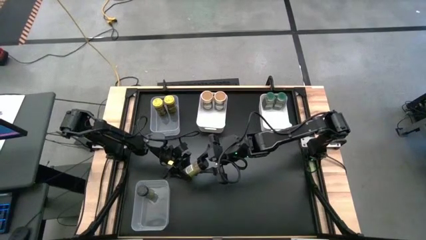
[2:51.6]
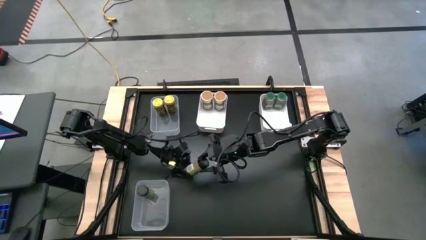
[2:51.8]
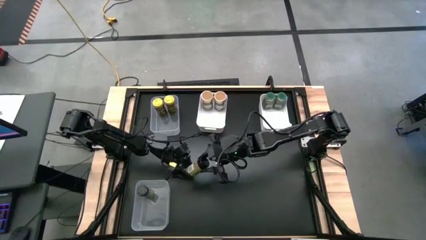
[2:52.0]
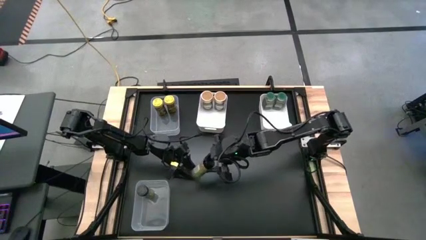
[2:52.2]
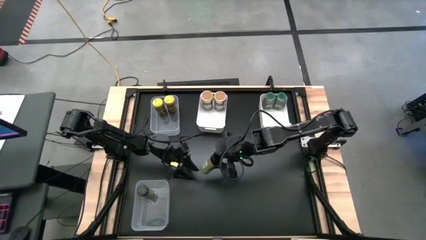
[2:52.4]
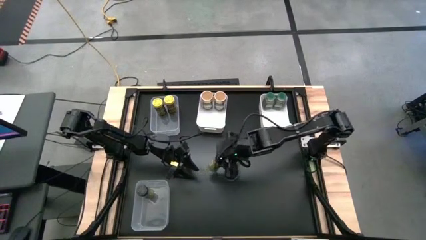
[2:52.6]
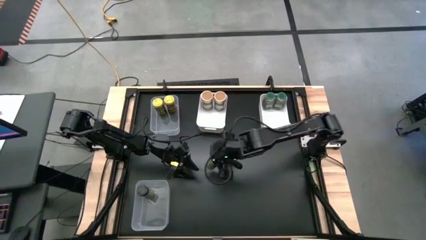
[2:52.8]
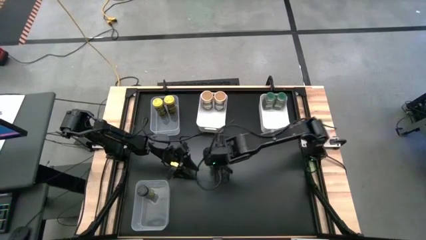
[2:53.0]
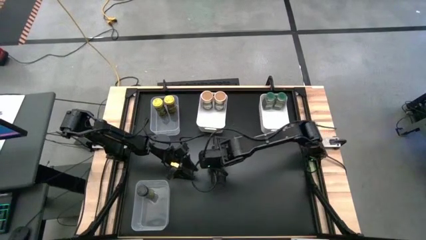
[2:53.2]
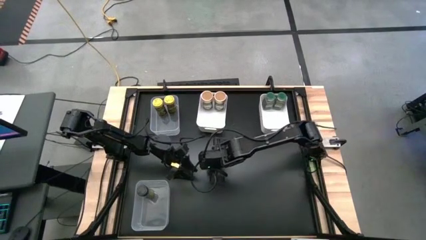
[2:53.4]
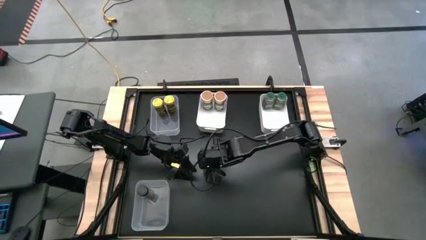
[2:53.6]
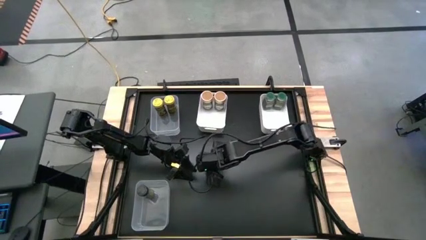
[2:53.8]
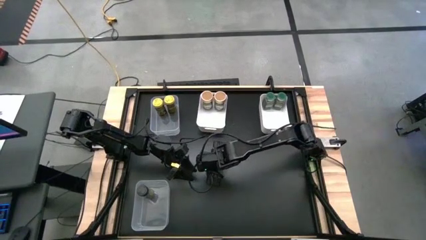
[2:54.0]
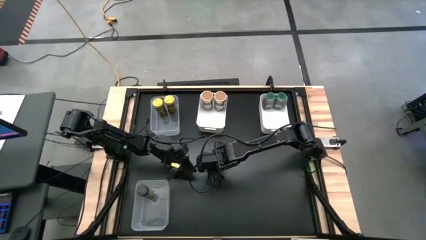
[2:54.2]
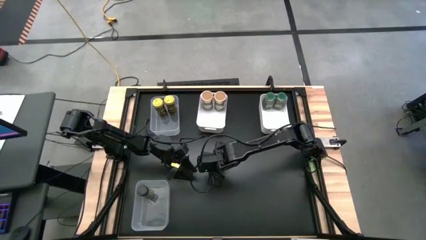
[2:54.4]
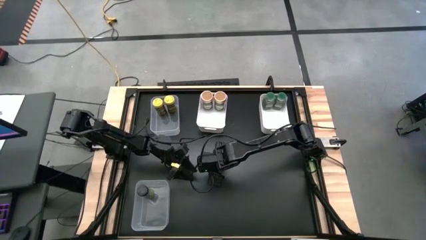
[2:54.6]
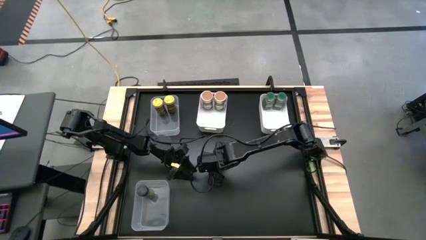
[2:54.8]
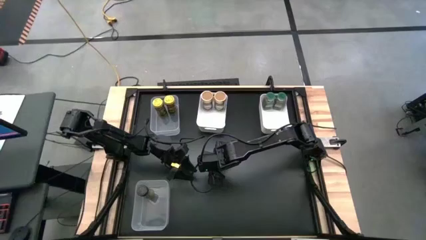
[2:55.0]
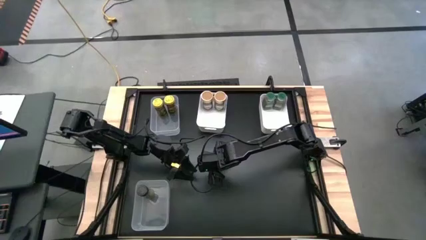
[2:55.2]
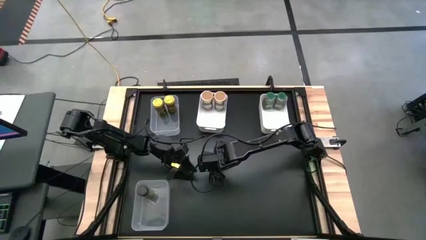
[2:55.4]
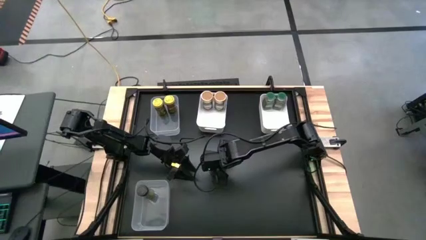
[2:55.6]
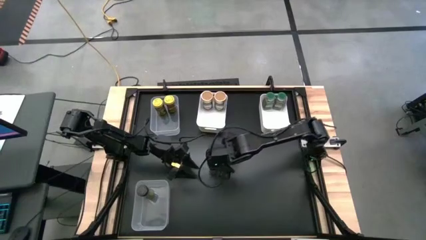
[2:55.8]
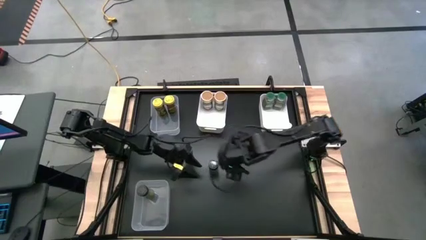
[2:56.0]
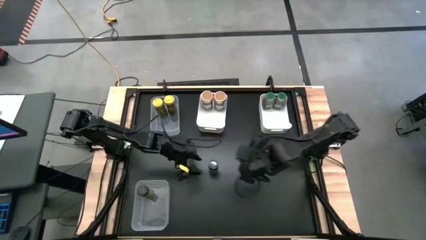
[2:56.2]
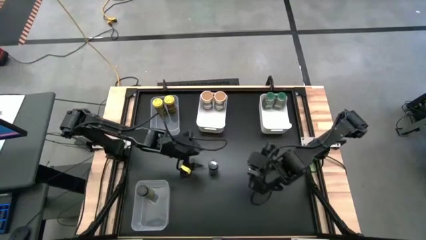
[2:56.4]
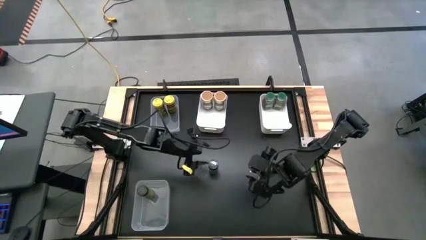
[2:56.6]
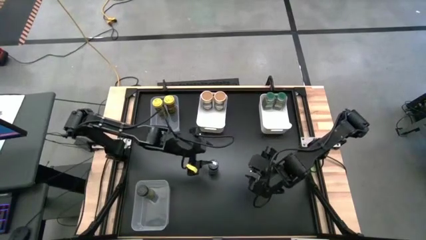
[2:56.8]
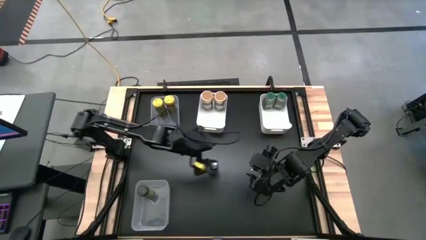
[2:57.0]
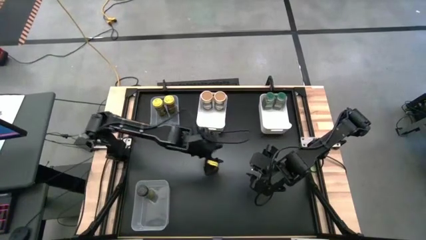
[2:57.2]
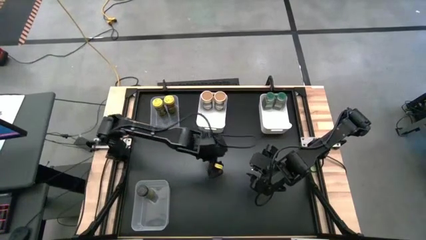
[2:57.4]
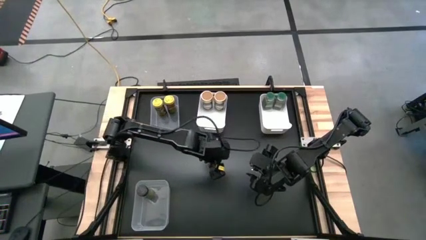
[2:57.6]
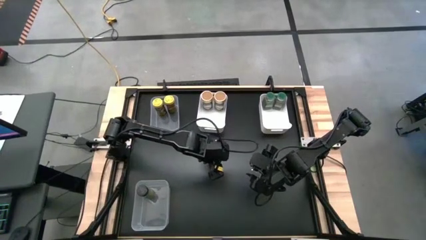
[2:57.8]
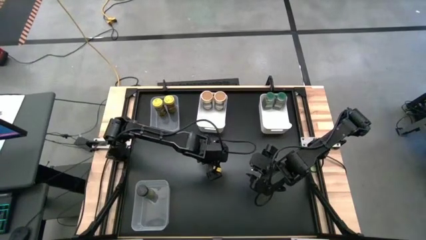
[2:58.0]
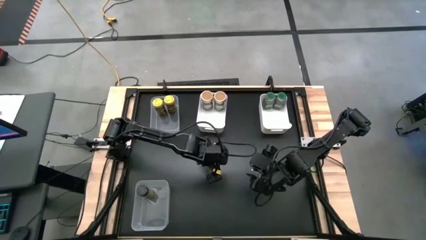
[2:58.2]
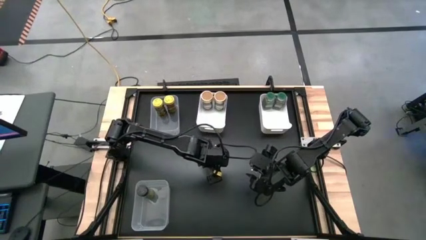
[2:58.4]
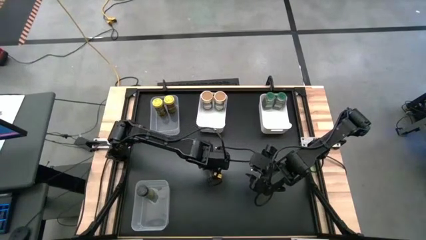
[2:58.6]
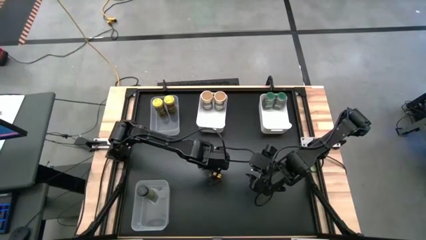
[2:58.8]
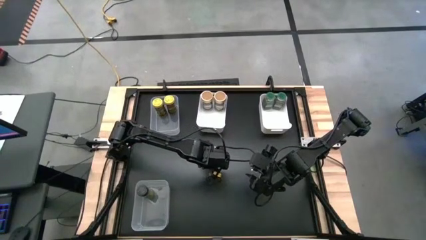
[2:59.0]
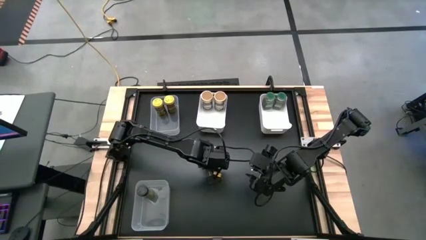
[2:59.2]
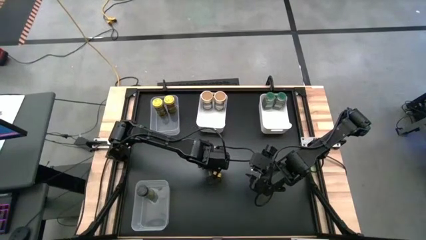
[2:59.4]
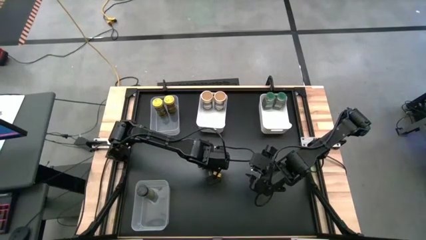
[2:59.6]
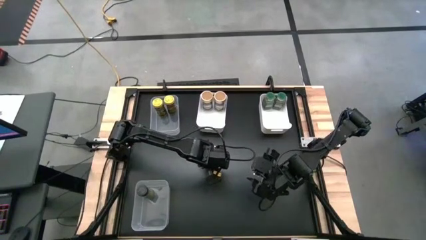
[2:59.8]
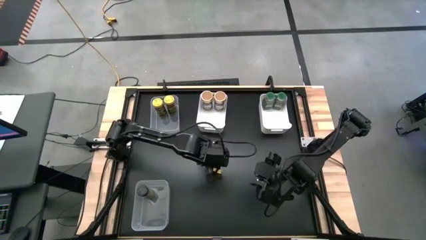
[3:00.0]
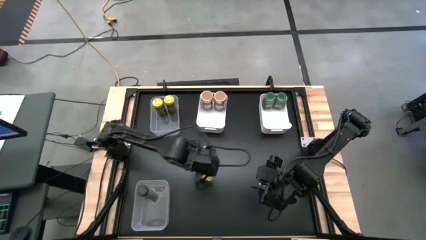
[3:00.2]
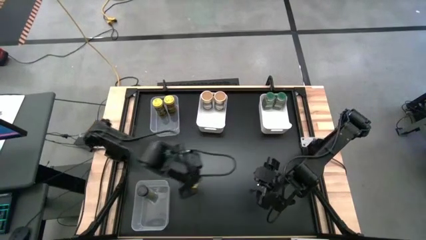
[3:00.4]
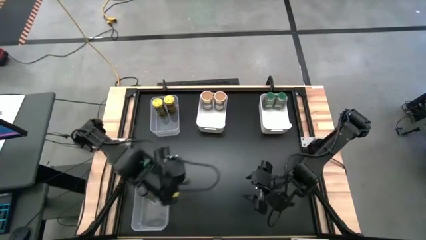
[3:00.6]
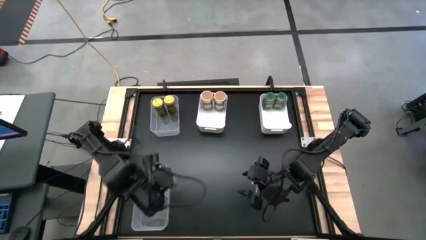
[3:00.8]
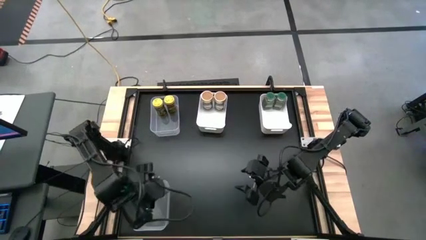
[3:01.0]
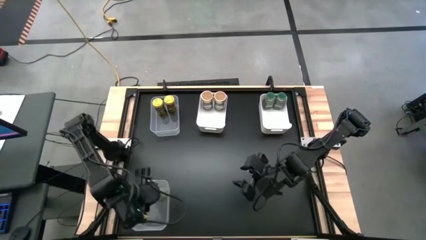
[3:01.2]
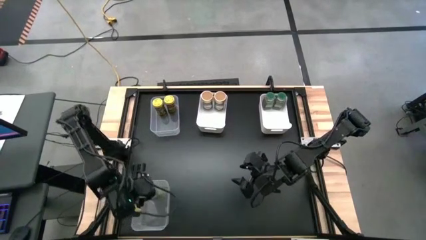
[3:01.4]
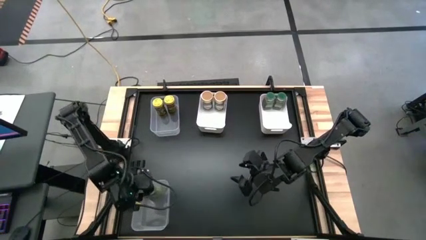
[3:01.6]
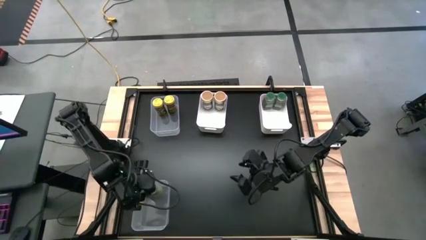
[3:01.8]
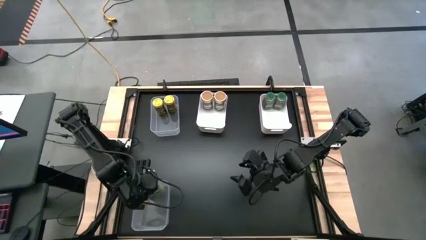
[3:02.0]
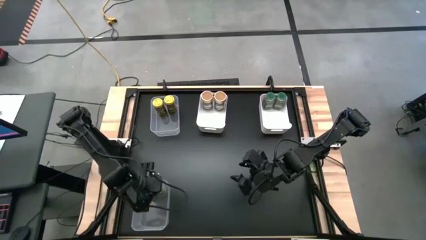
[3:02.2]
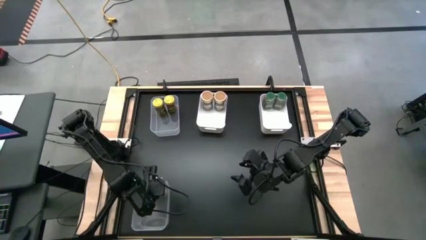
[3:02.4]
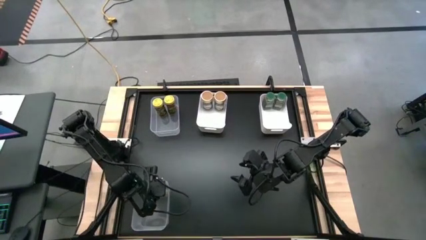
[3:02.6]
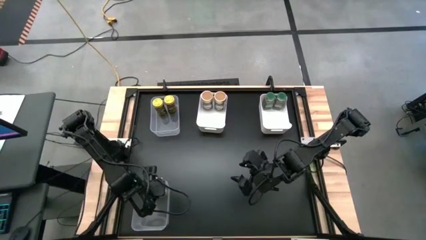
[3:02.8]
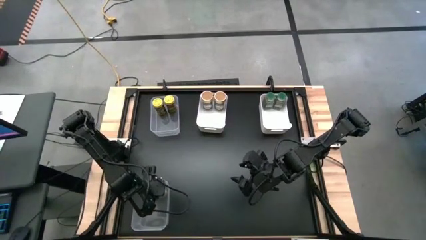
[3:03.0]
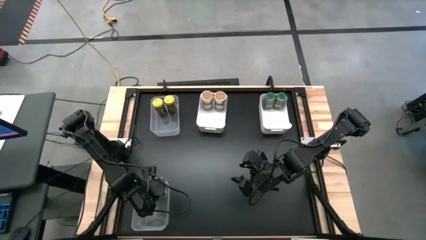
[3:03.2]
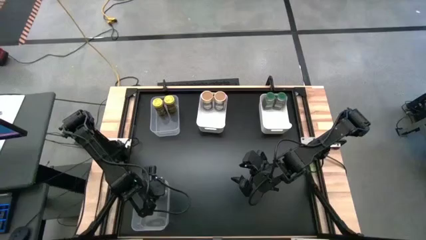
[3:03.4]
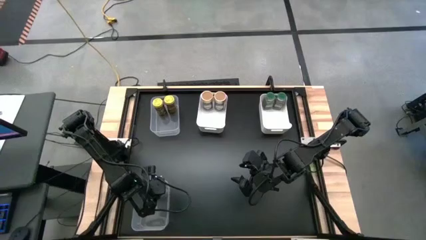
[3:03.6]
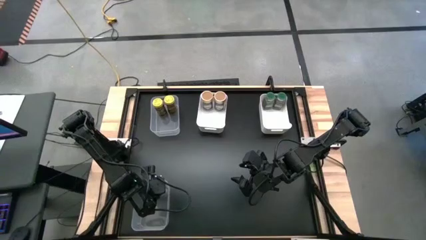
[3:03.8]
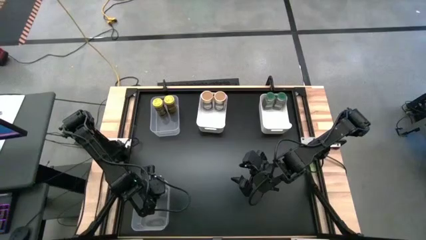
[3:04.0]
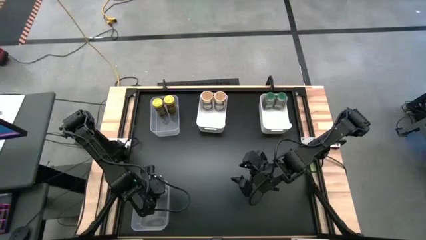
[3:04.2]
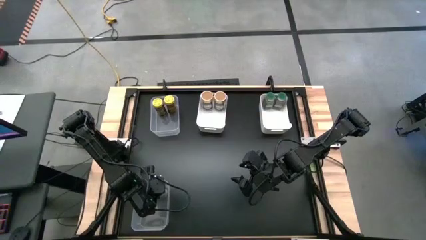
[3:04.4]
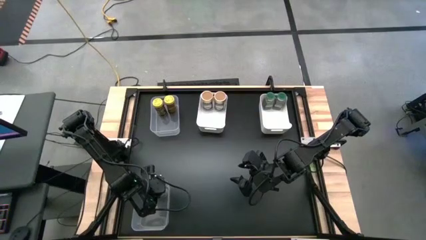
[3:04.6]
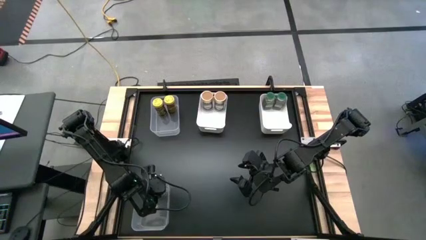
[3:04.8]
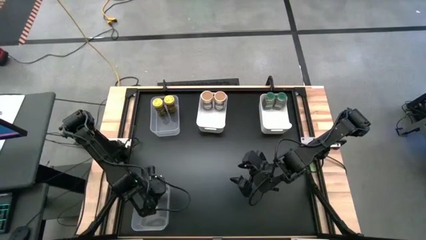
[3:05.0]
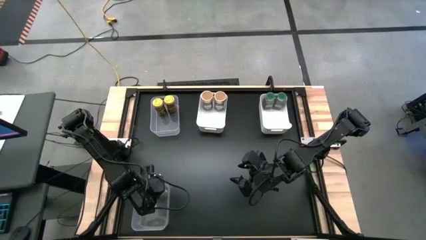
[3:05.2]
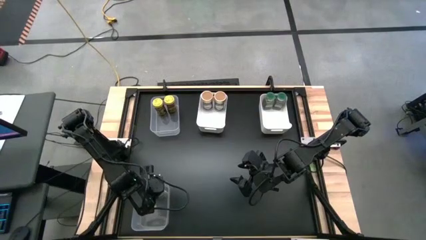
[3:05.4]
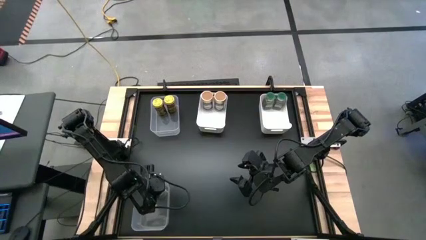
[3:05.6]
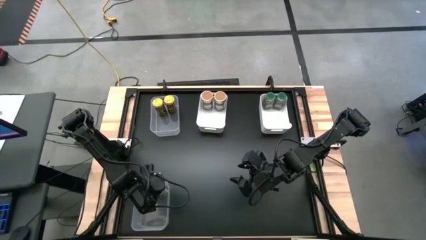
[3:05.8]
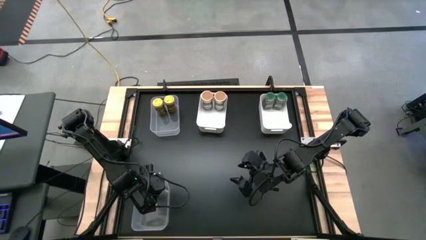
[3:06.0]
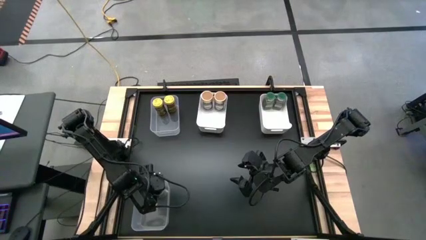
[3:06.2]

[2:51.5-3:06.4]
Task: Sort spices by type
Put the black spice bottle into the bottom transparent bin
